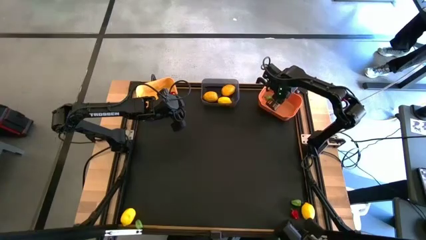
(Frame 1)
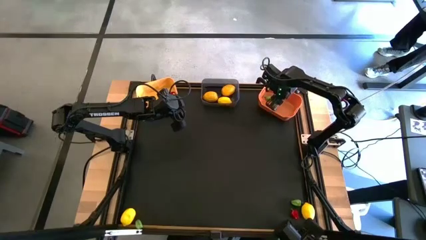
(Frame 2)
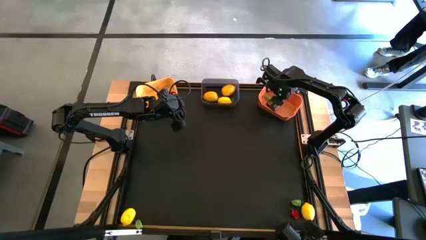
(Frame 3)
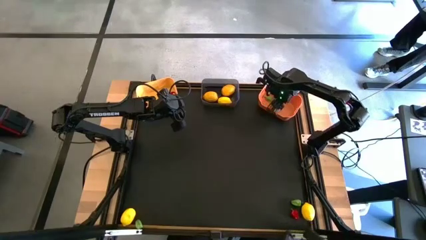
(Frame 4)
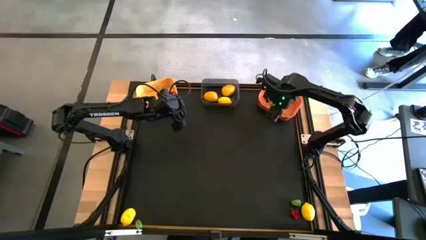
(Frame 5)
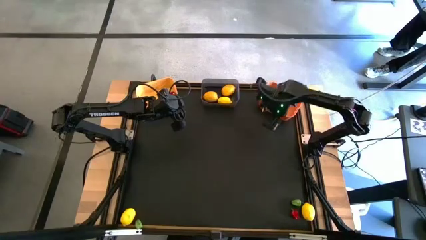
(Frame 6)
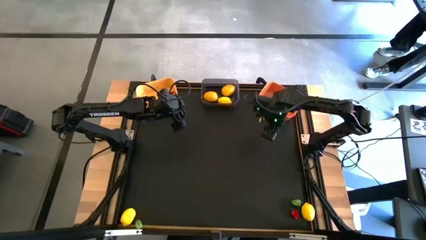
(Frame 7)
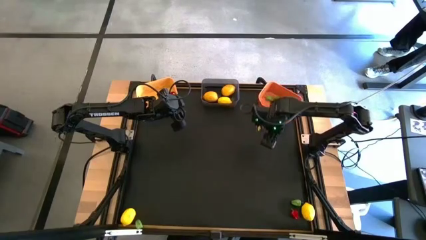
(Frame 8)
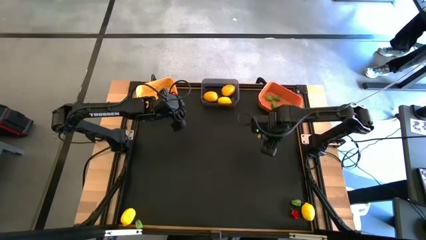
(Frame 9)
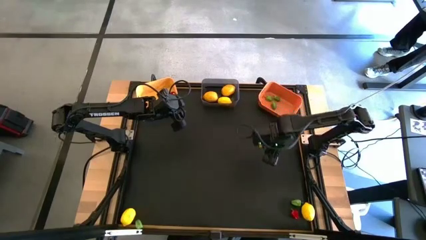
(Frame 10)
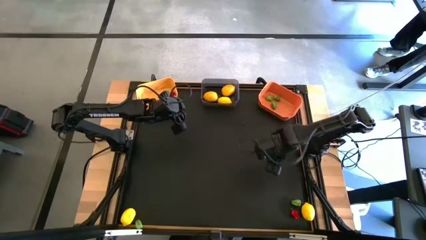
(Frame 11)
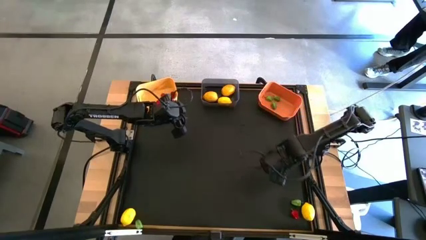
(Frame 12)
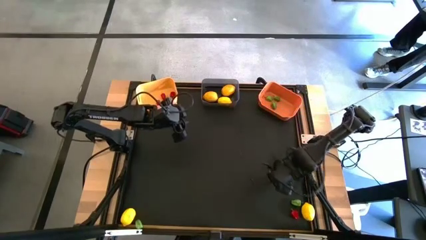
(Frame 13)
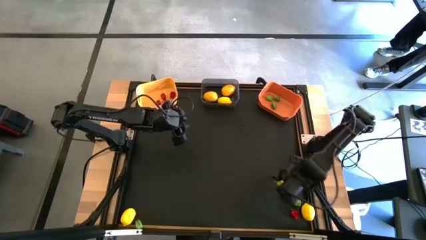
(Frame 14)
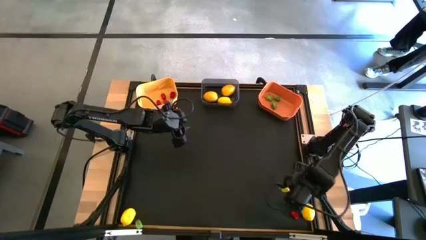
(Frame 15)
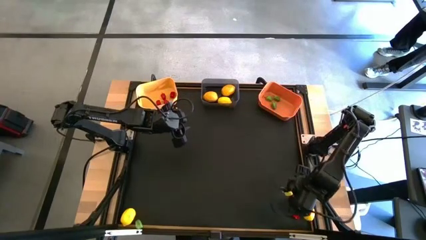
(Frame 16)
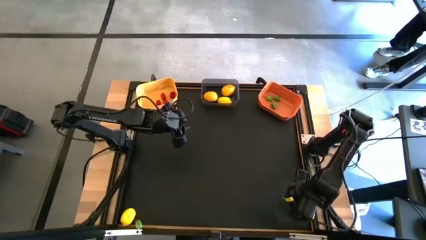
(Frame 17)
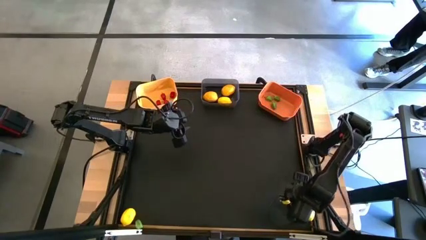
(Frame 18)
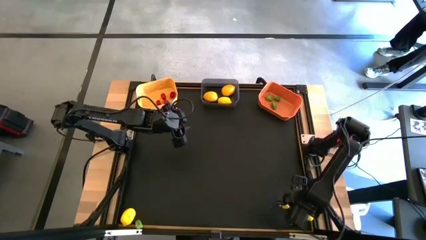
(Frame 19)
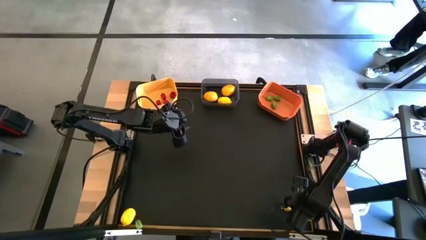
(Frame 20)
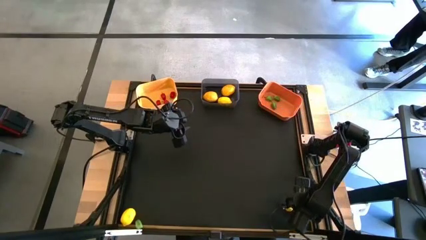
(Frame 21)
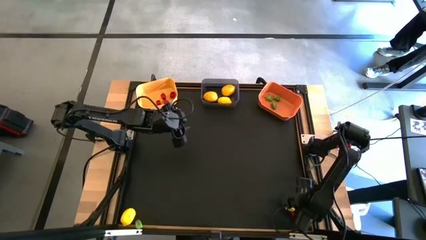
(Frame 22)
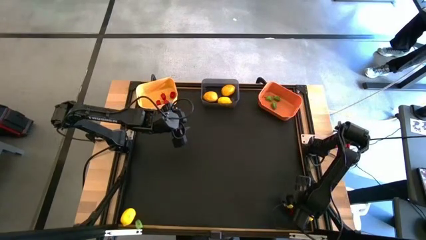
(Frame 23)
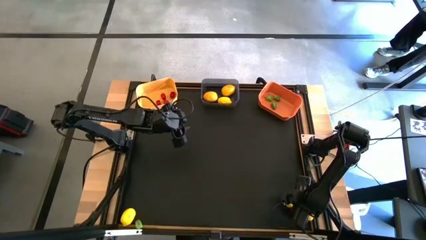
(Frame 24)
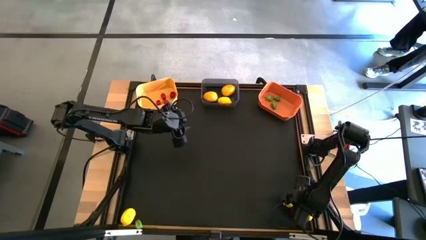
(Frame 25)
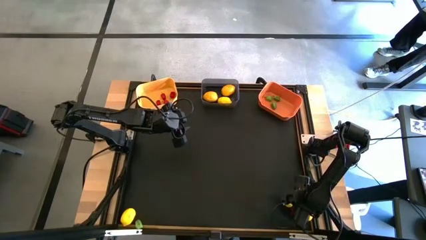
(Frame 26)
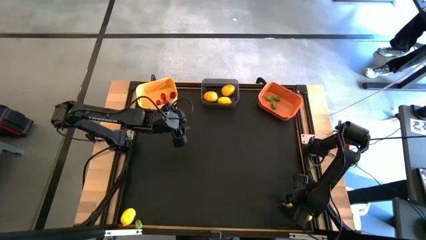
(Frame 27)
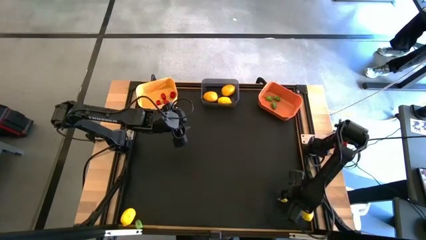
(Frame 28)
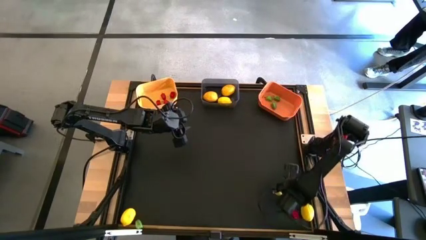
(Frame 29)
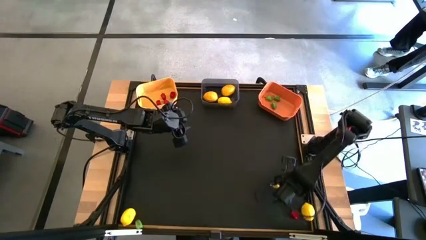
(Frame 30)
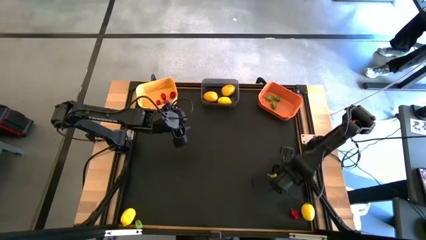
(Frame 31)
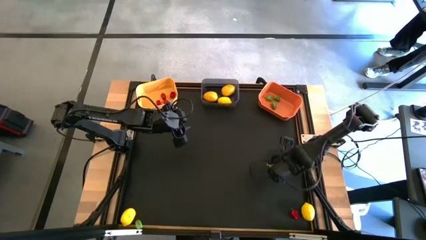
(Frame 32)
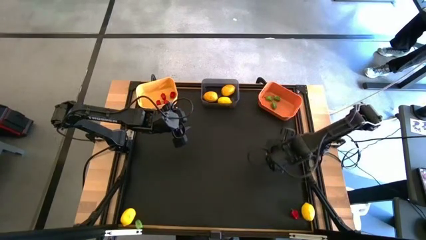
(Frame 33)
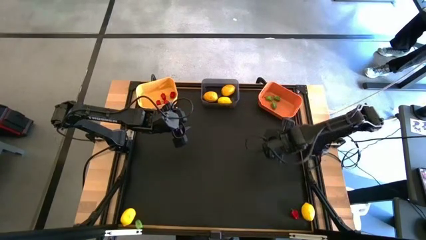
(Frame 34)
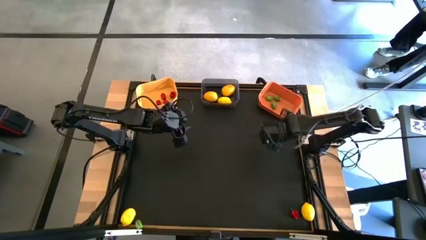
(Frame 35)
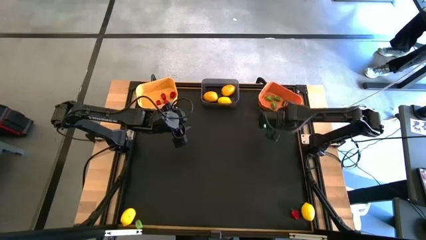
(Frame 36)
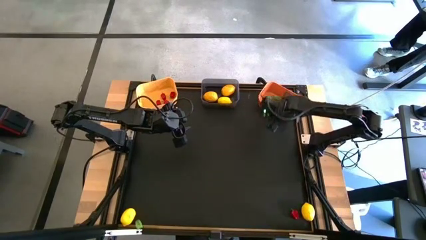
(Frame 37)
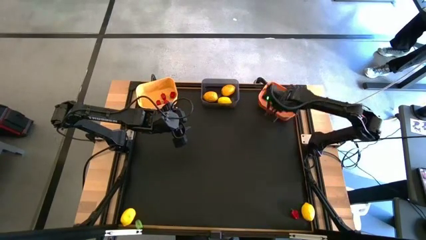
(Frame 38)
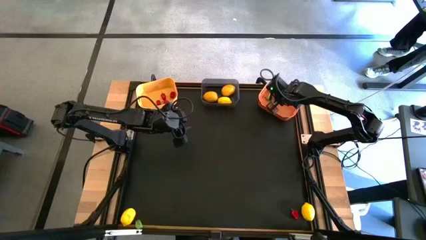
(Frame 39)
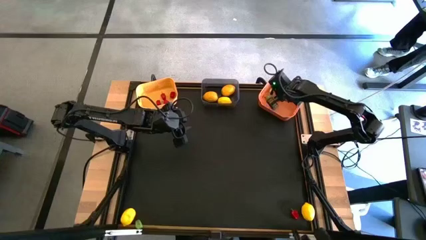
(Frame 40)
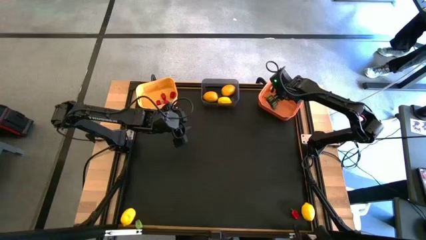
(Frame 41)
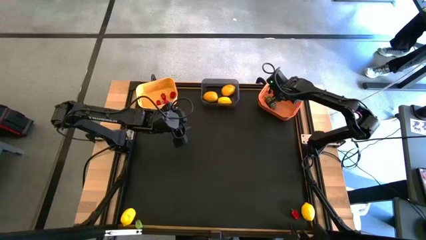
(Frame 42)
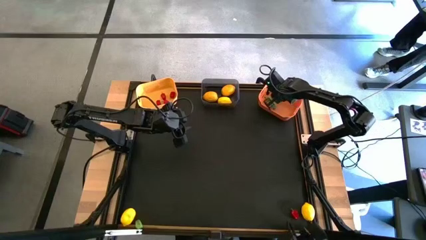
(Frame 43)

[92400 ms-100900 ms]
Task: Sort produce into baskets
Put the green chili pepper into the orange bin

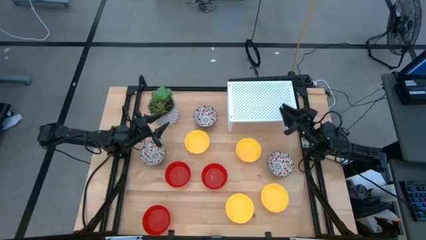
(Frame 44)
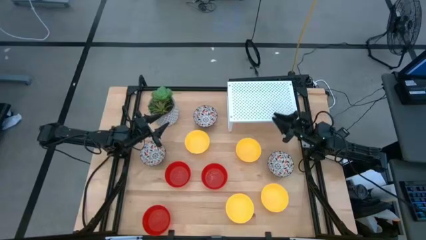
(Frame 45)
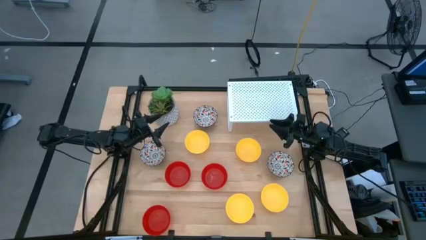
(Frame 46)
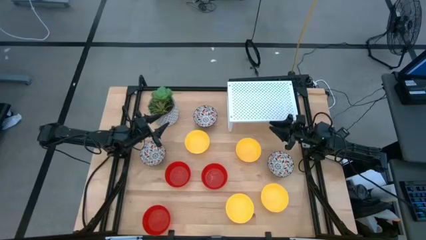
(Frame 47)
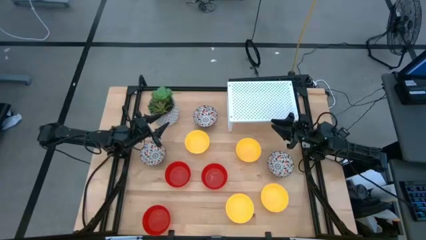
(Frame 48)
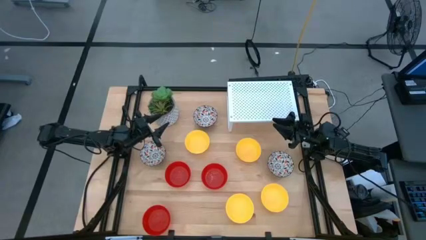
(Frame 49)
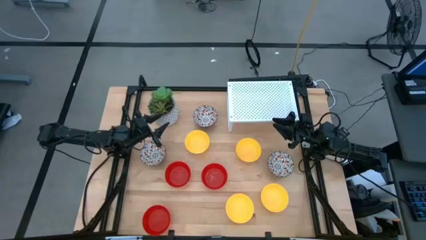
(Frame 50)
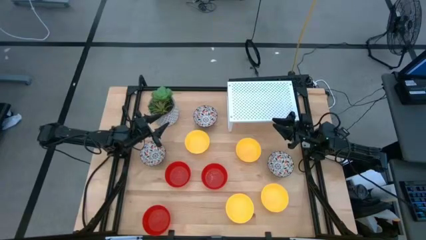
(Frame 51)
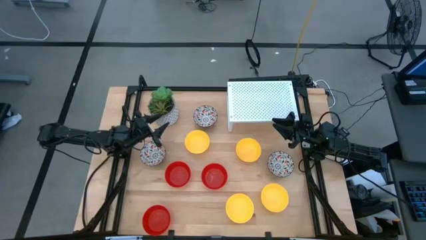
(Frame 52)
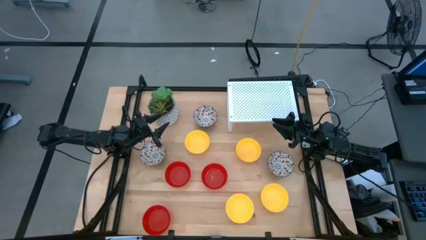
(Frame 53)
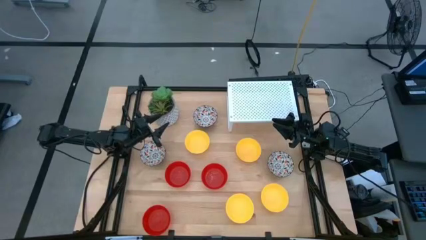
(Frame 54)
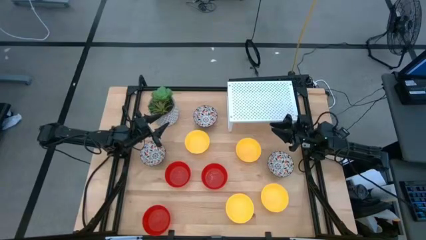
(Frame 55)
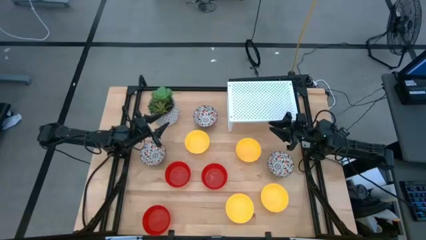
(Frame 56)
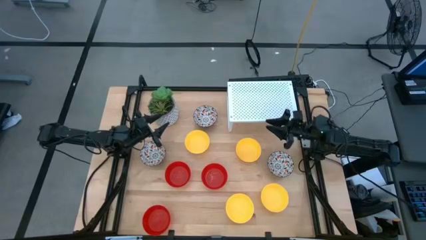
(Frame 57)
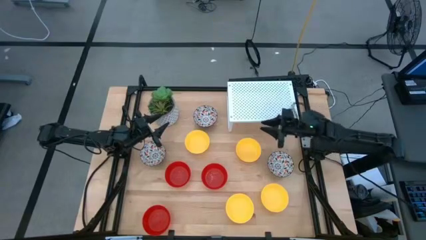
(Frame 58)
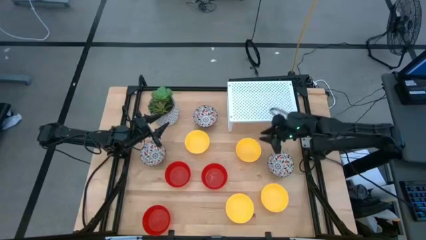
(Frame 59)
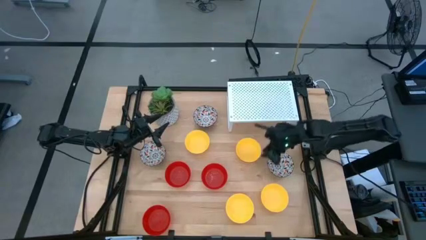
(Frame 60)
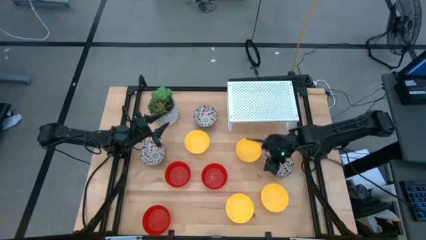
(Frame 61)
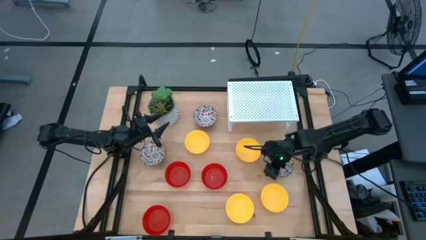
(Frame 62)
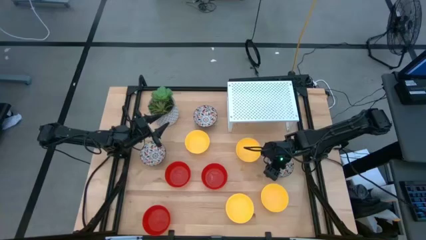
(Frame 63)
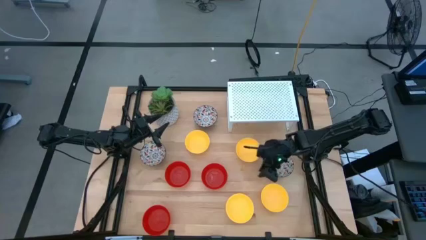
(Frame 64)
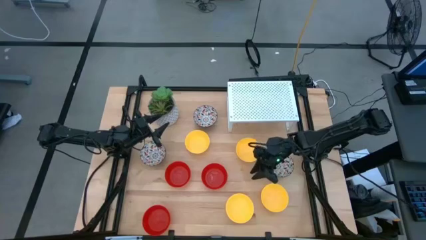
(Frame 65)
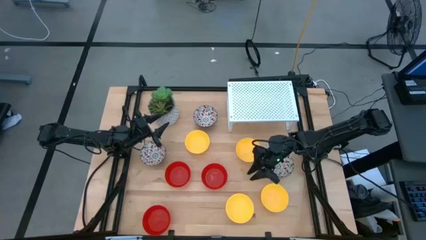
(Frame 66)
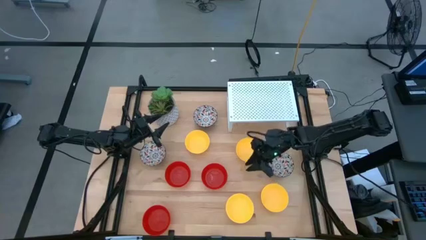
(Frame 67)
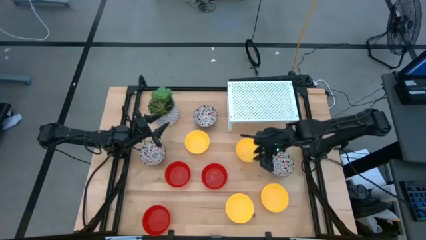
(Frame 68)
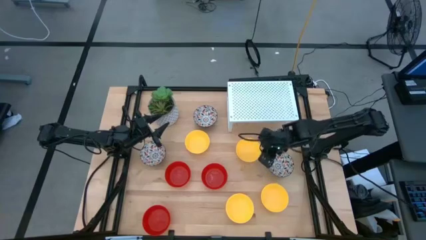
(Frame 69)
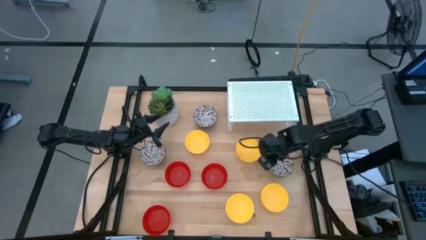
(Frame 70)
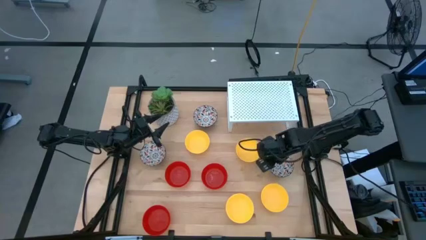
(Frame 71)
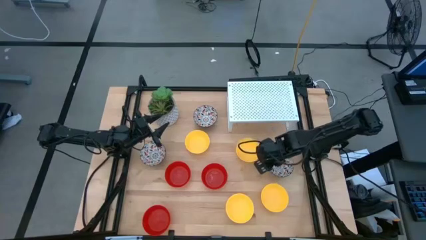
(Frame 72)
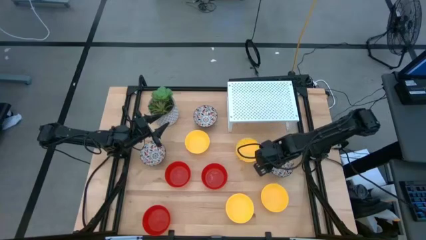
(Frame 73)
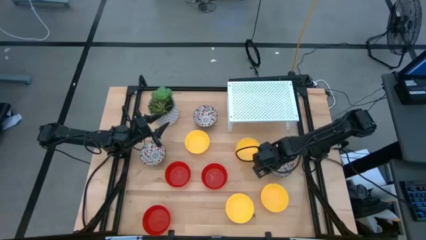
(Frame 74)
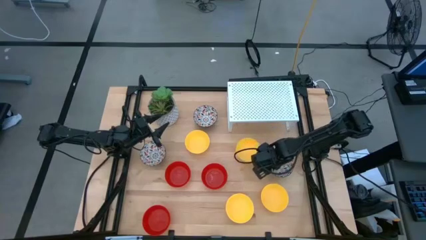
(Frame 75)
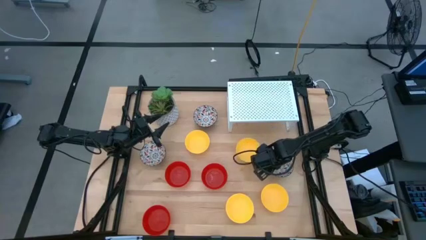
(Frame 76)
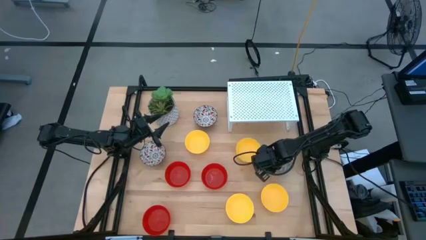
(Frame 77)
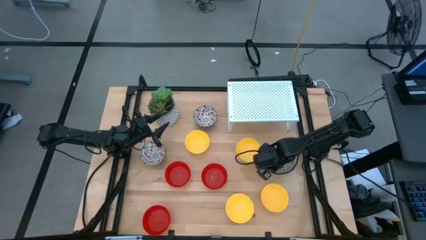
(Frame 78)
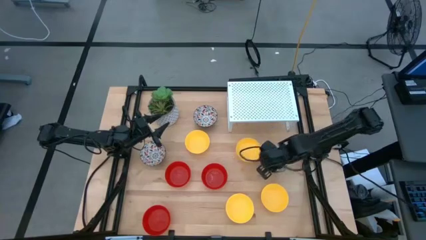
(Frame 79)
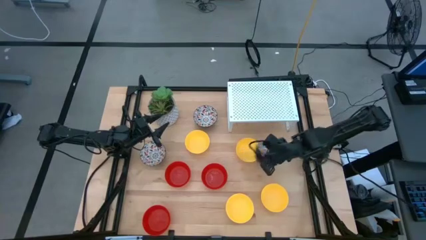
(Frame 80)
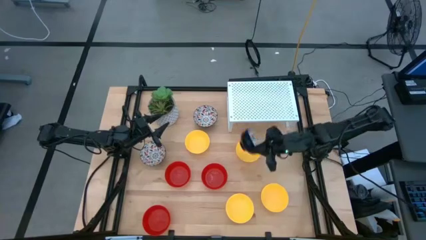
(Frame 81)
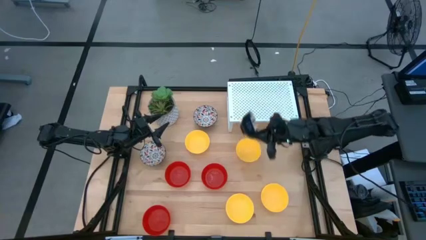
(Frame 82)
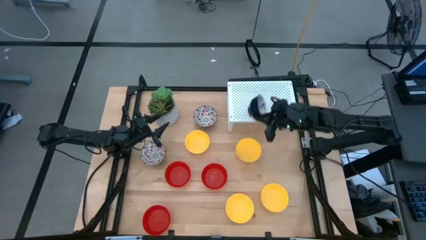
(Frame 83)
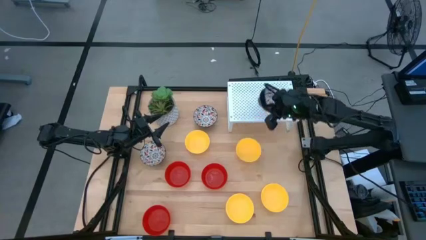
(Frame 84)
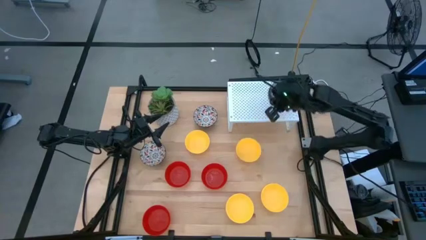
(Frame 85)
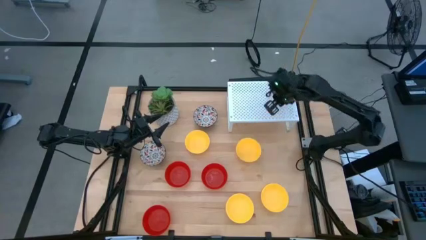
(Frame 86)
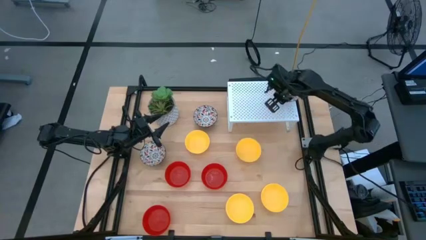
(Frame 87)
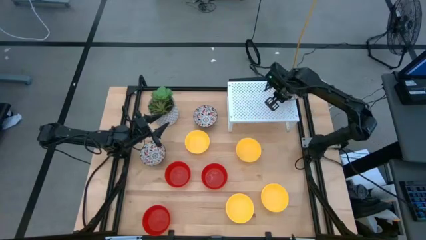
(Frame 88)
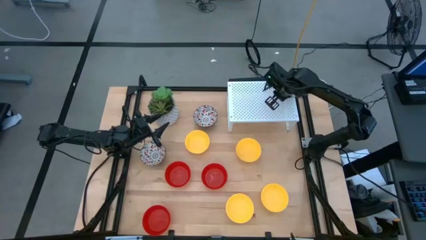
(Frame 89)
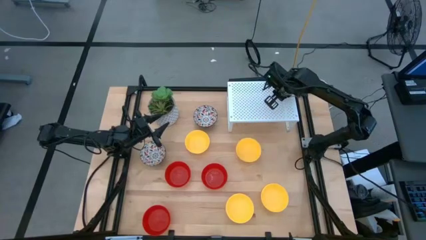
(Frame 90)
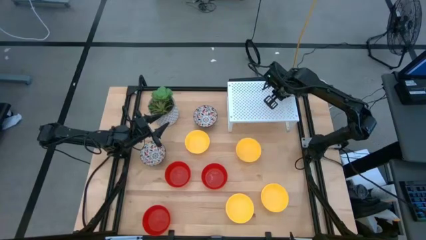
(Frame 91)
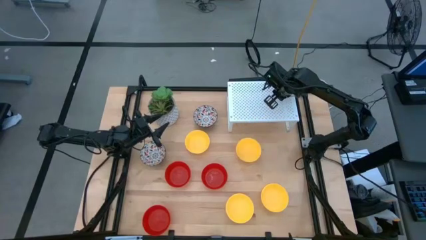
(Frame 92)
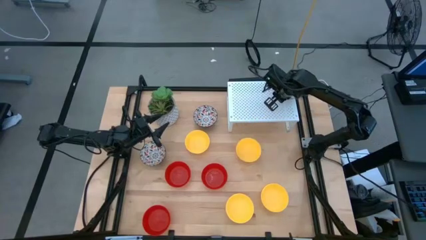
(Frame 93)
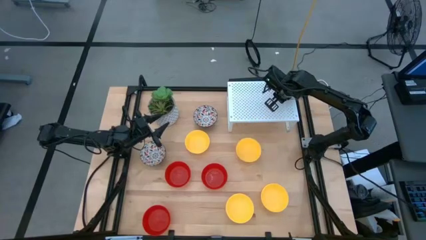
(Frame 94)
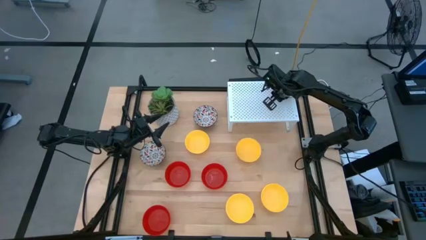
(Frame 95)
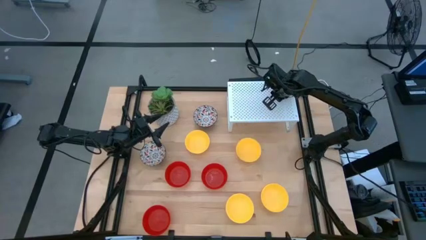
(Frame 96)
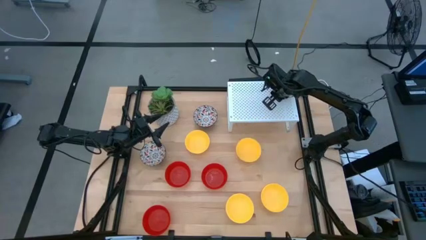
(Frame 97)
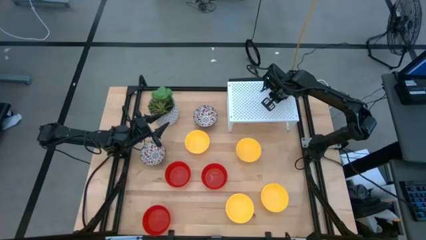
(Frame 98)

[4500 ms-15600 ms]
Task: Pick & Place Mini bowls
Put the white and black bowl on the shelf
